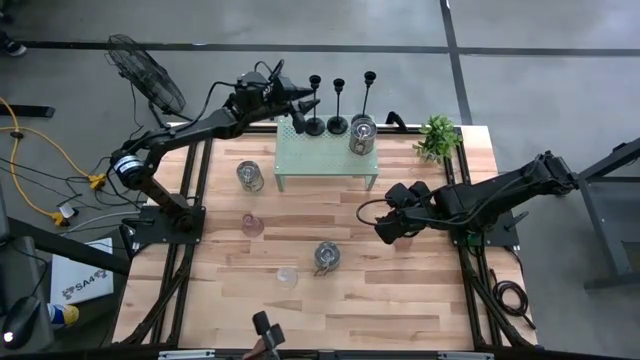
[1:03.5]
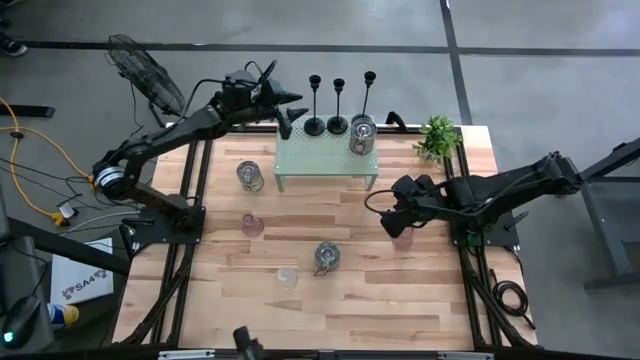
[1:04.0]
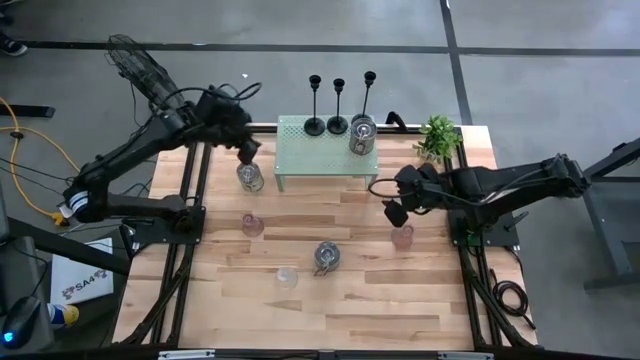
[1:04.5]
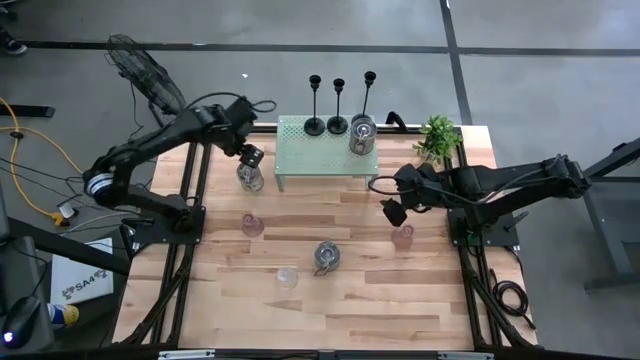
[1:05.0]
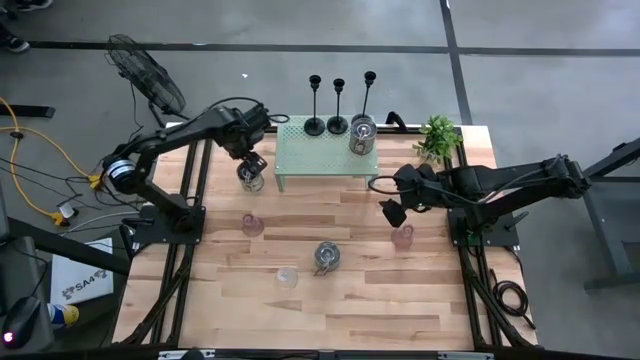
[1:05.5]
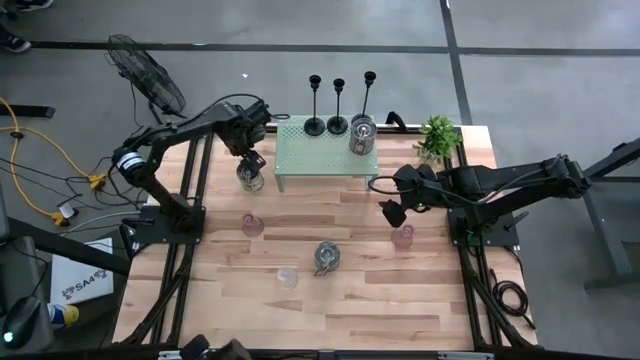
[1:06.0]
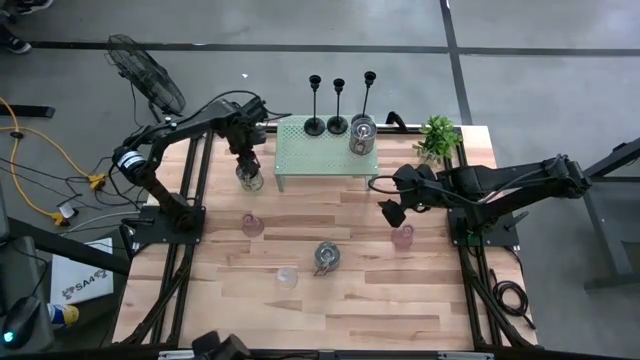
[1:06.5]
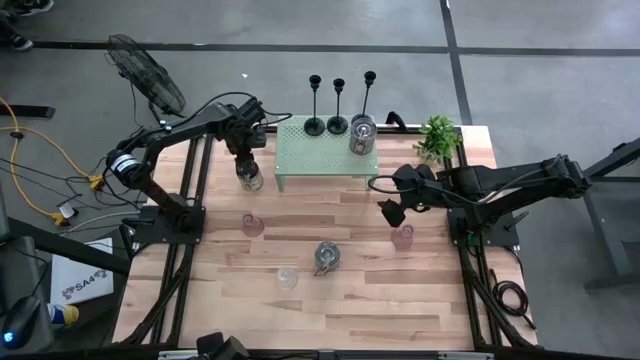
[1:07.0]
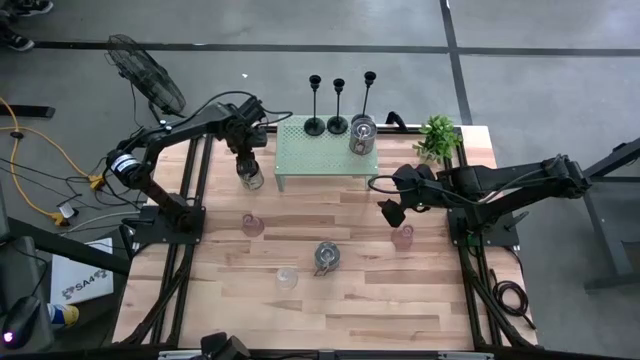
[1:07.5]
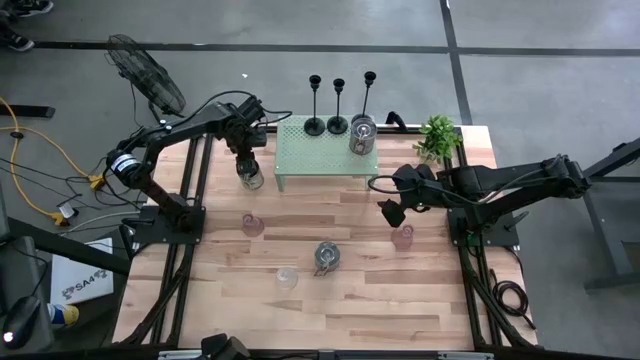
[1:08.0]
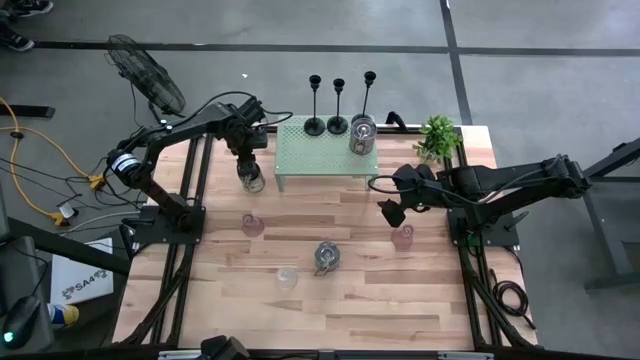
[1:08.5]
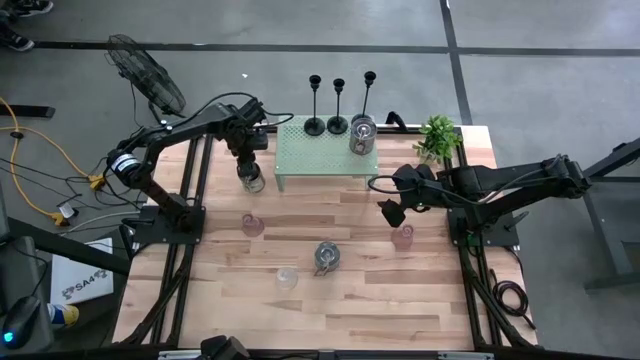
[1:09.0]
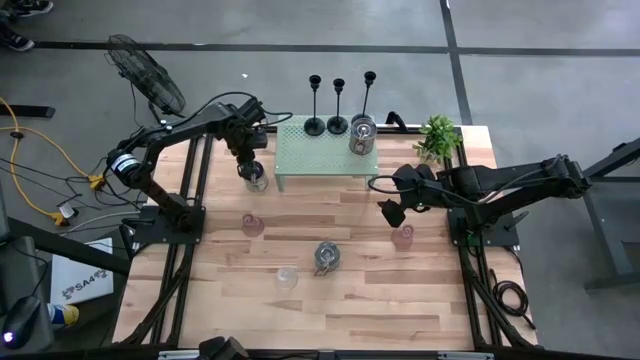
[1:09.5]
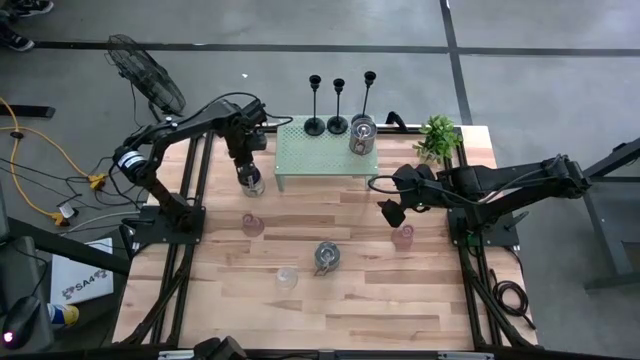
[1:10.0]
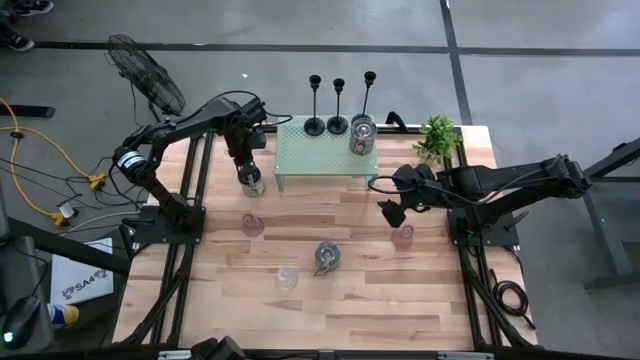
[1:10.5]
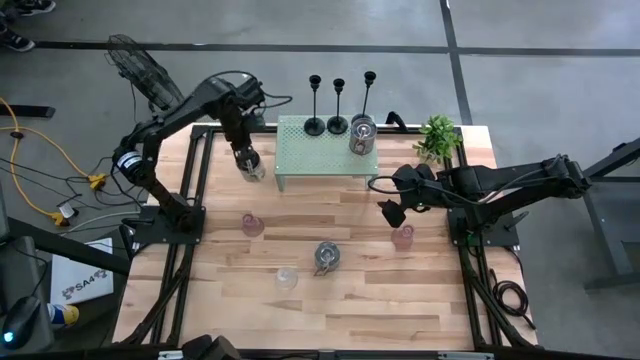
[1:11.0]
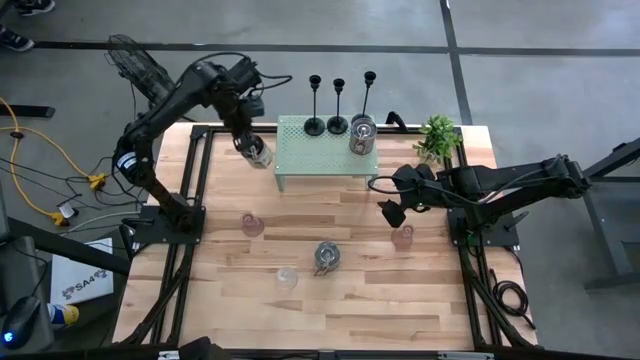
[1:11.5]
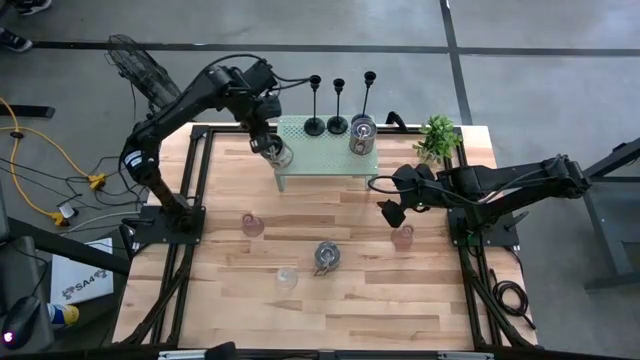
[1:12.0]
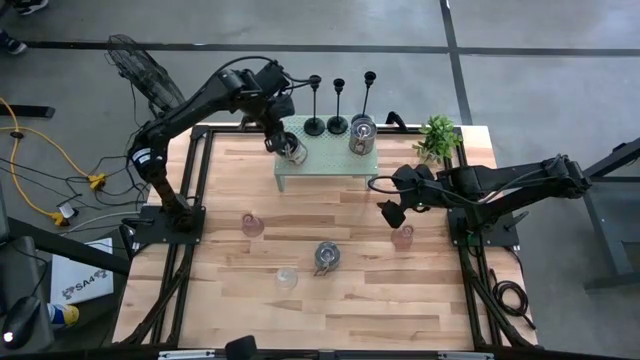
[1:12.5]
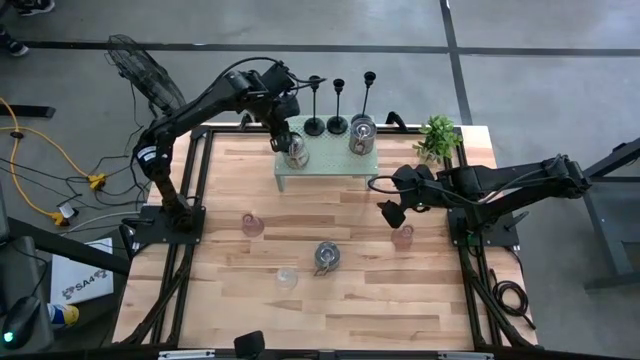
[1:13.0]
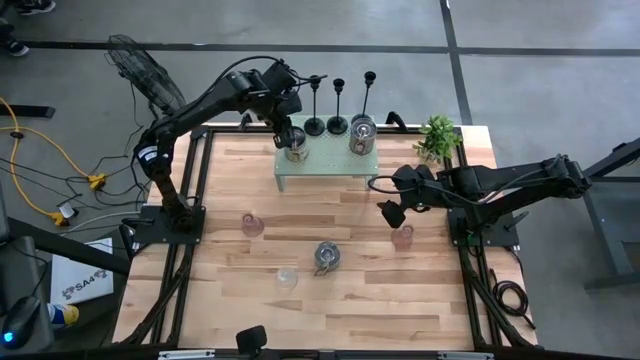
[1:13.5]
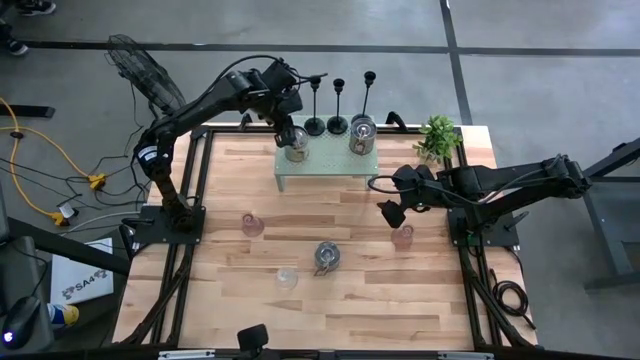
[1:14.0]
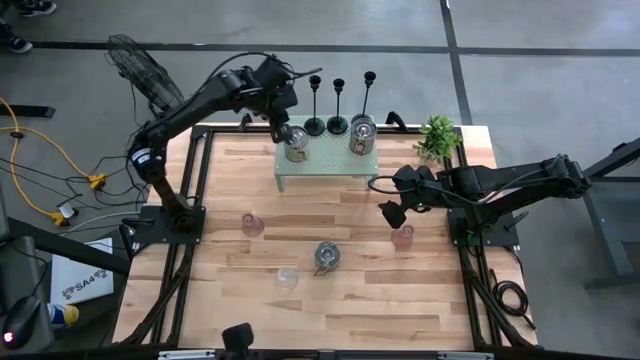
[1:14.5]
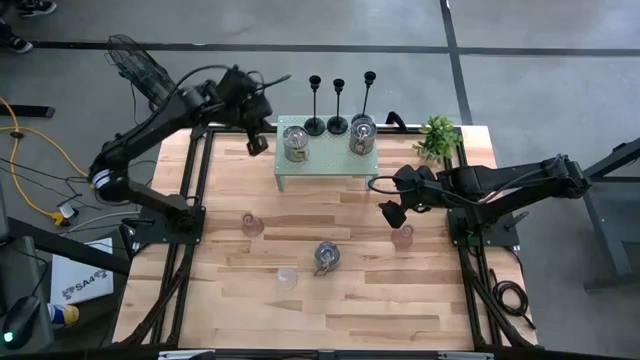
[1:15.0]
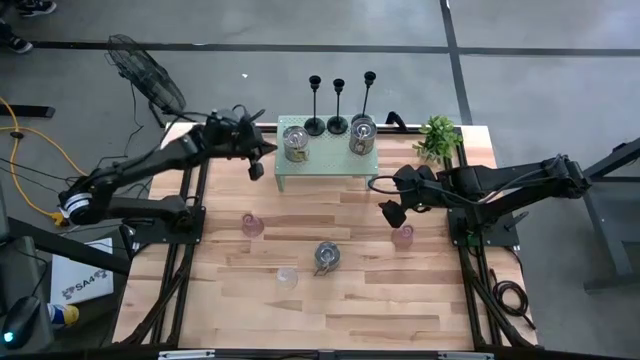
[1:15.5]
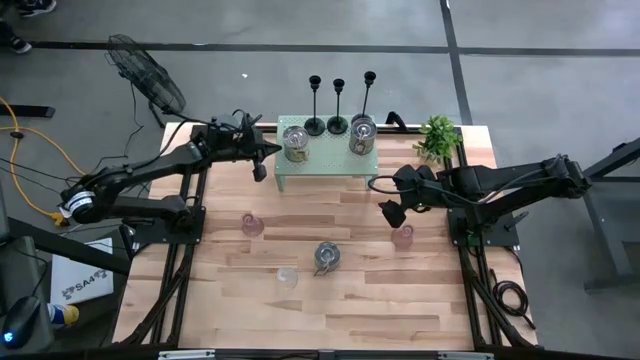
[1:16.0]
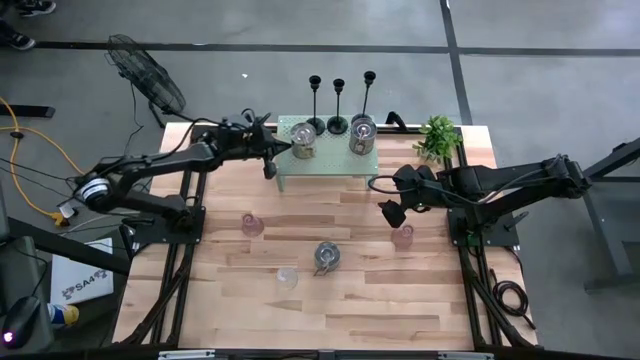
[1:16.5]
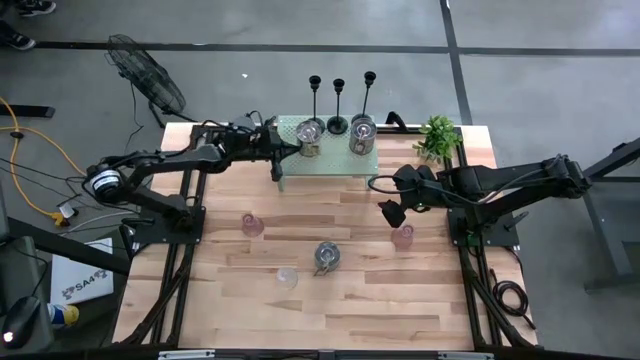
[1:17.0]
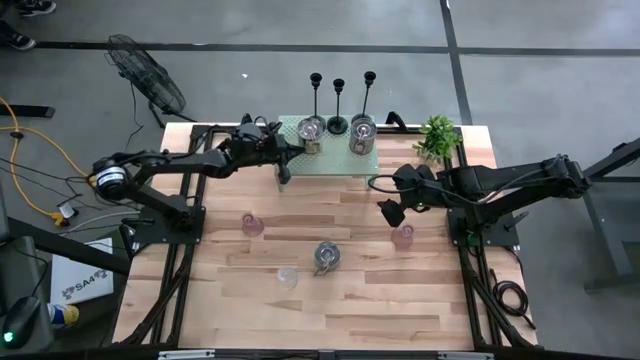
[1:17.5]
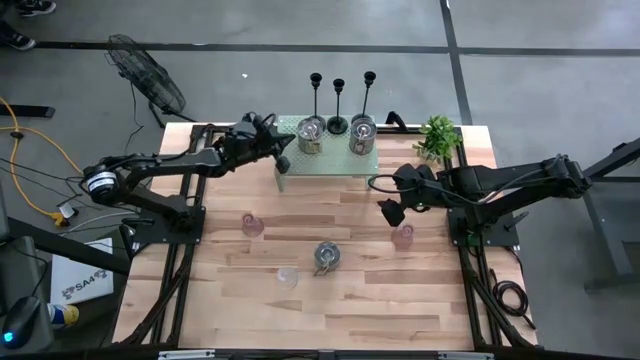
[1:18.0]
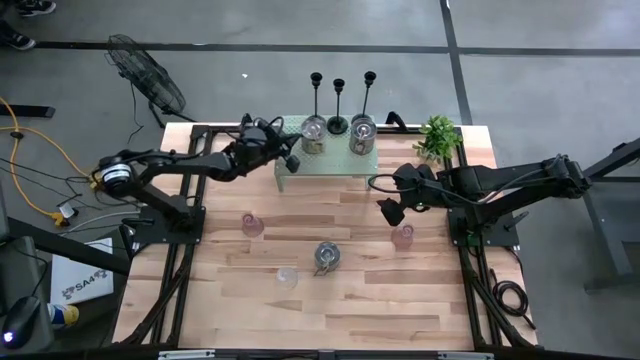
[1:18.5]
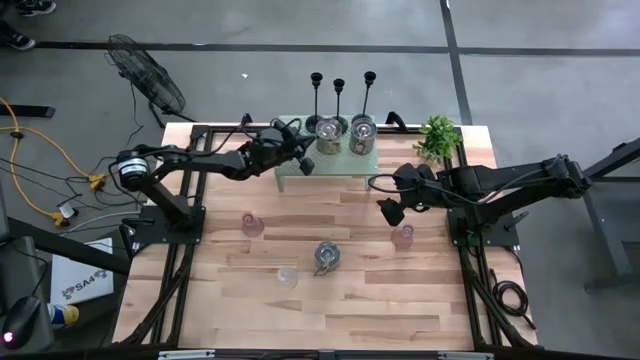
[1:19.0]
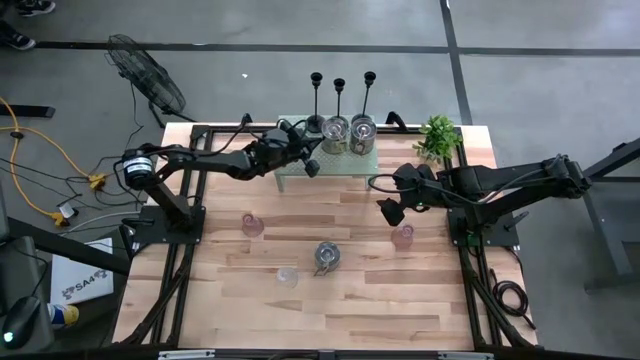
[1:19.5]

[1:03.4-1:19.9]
Task: Pick & Place candle stick holders
Put the top silver scented candle on the shelf aligned with the silver scented candle

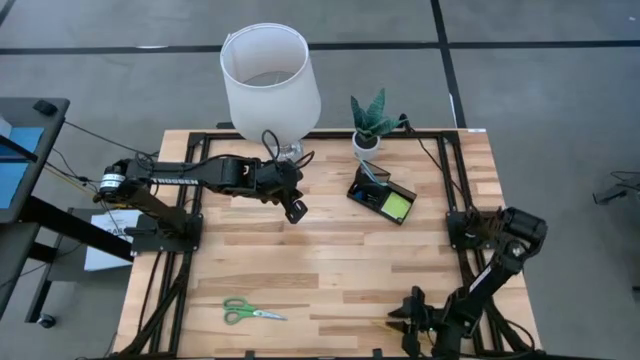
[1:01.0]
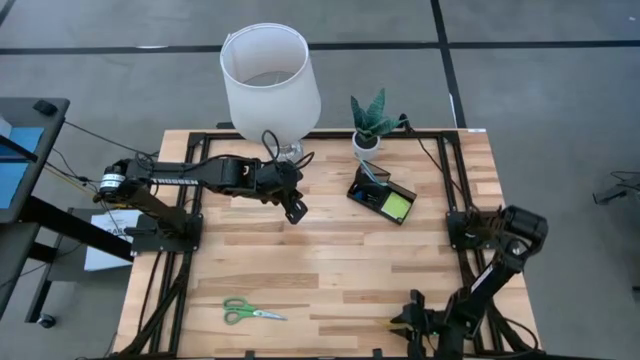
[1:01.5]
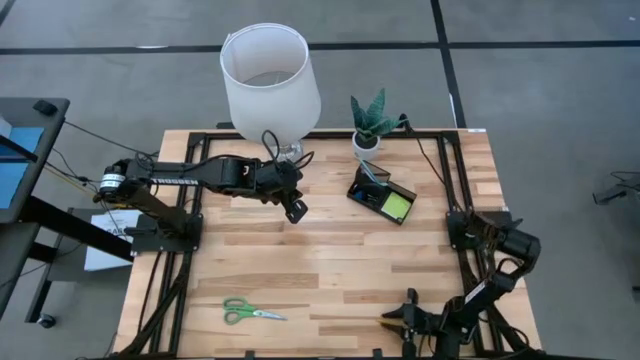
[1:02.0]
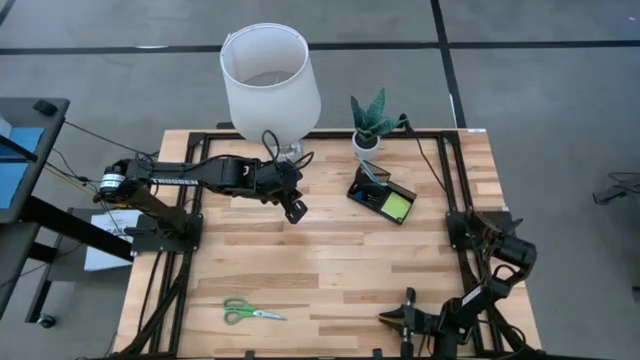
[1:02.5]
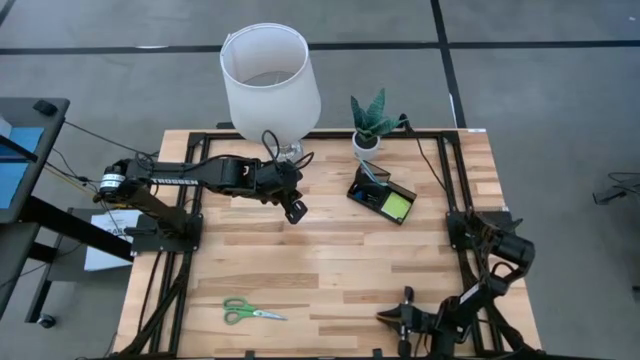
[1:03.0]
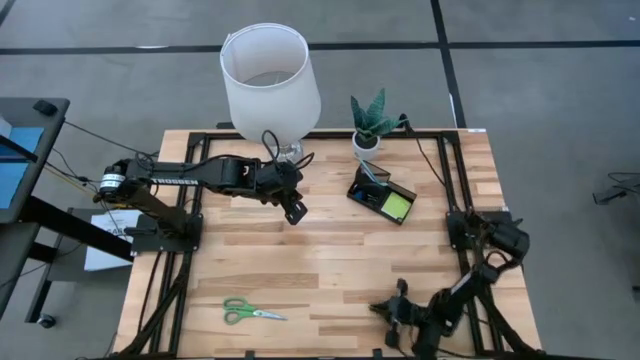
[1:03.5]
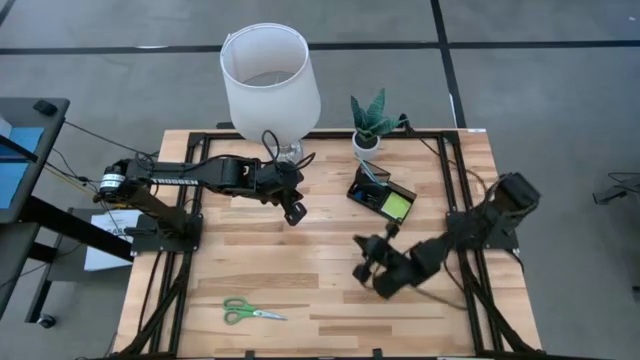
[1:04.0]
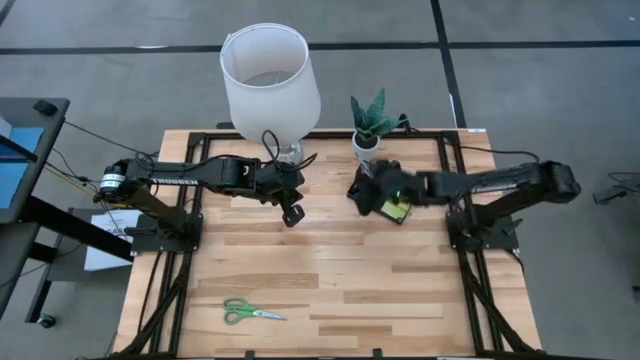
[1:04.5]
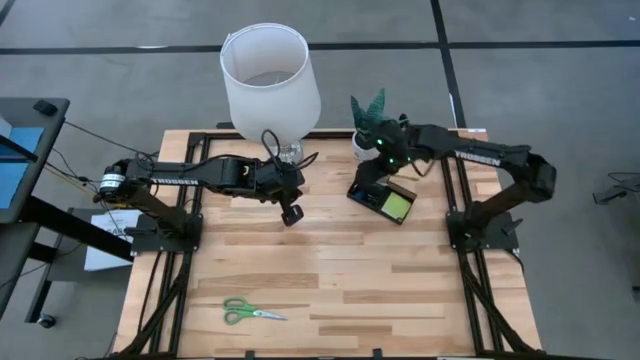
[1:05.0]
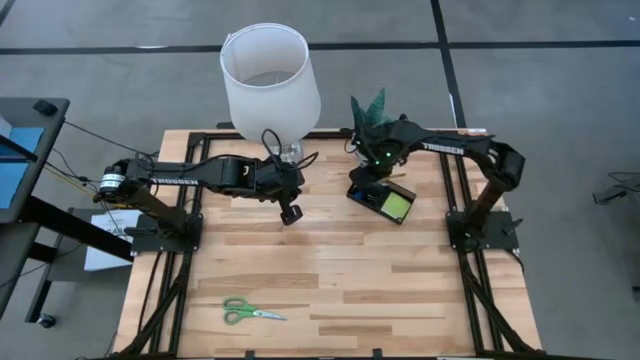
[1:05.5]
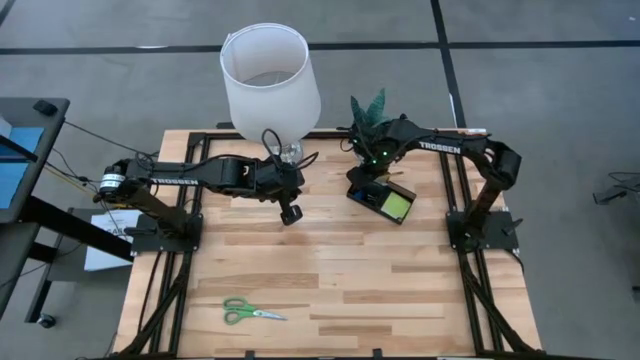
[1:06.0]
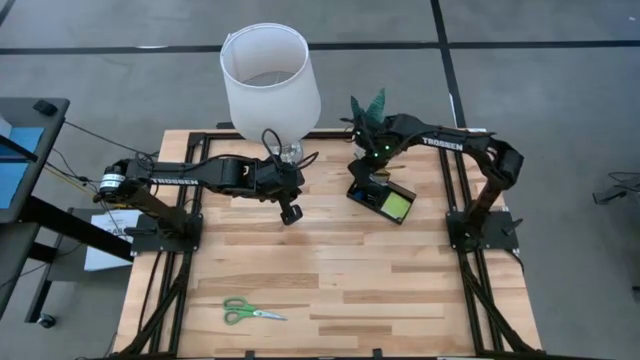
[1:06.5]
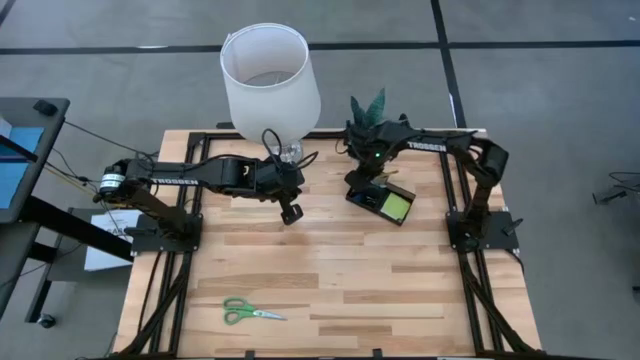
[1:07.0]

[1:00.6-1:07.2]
Task: Pick and place office supplies into organizer
Put the yellow pencil into the black organizer
